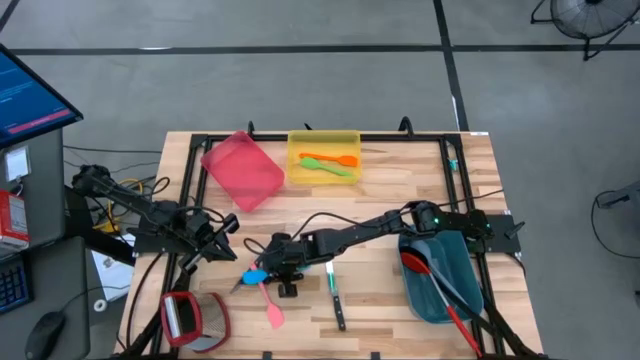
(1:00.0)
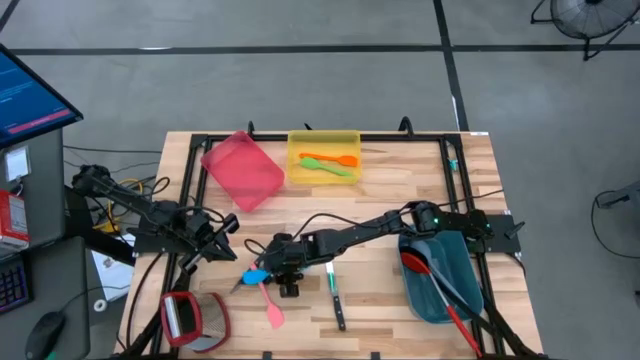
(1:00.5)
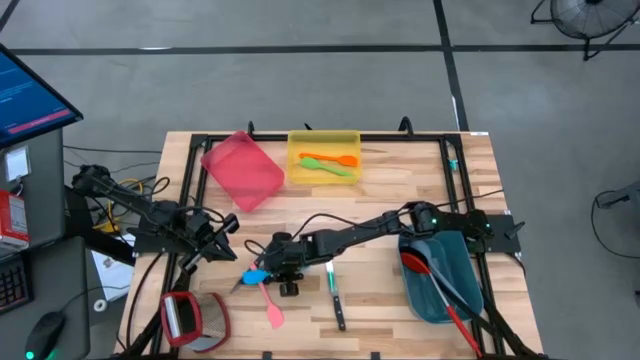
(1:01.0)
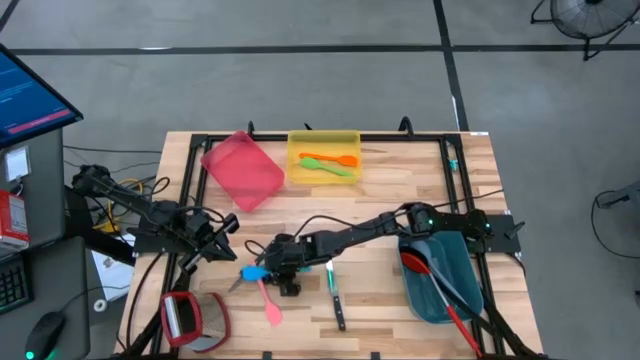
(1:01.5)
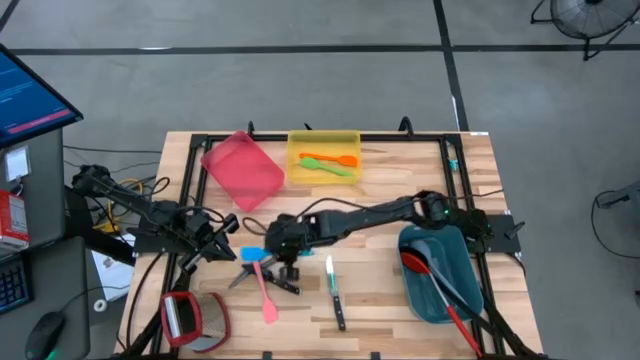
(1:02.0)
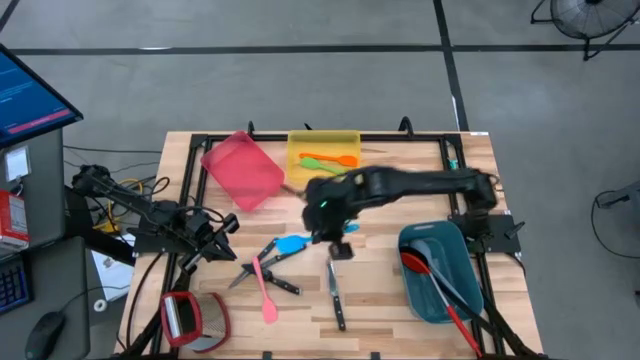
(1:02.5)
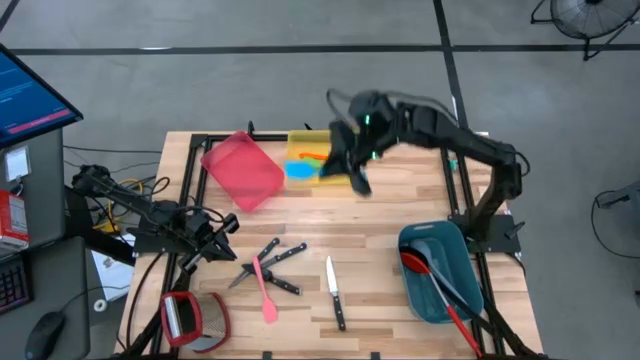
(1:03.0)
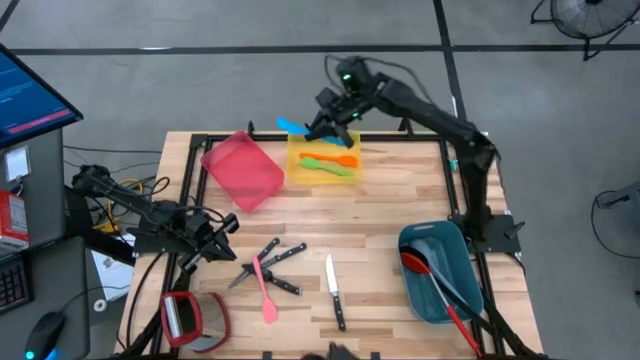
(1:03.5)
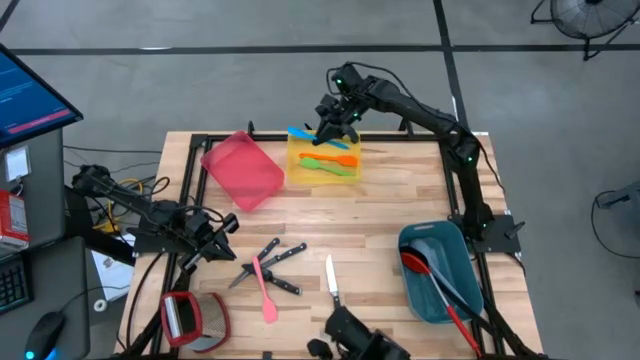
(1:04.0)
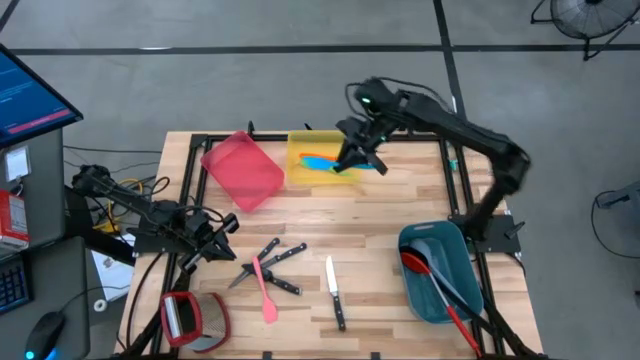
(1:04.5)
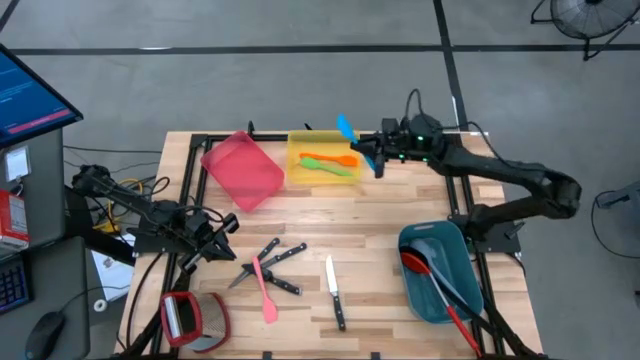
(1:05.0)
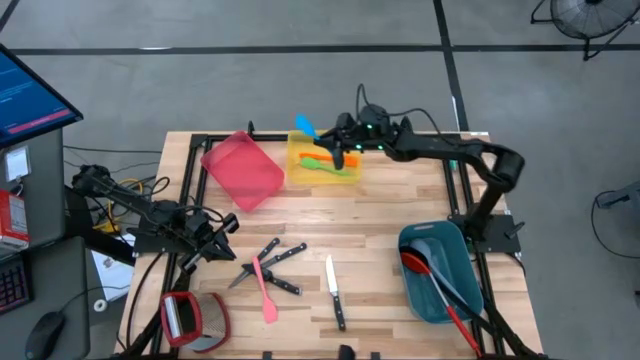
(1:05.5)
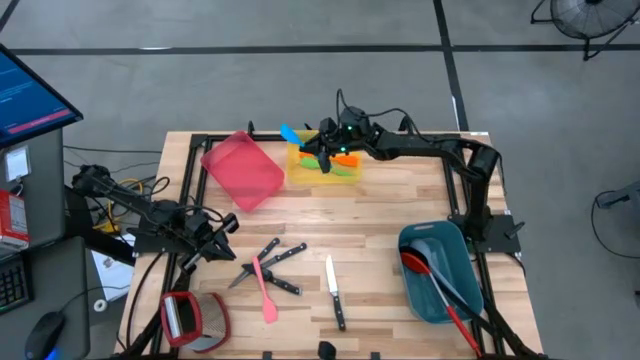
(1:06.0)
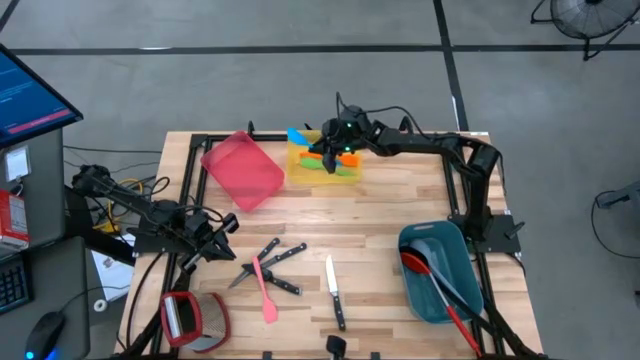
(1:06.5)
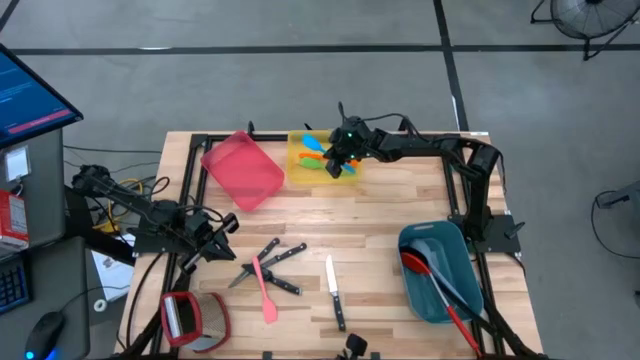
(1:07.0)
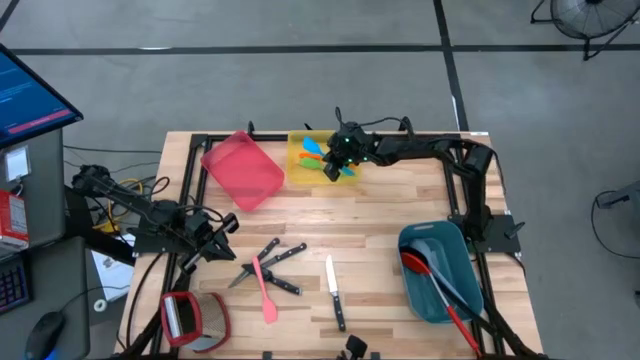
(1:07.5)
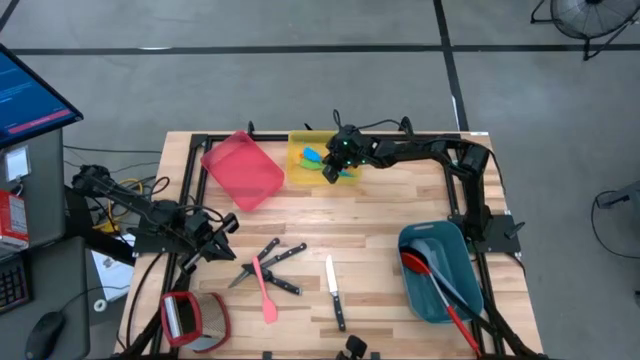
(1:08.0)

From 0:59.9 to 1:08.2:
Task: Pick & Place Kitchen Items
Put the blue spatula into the yellow bin

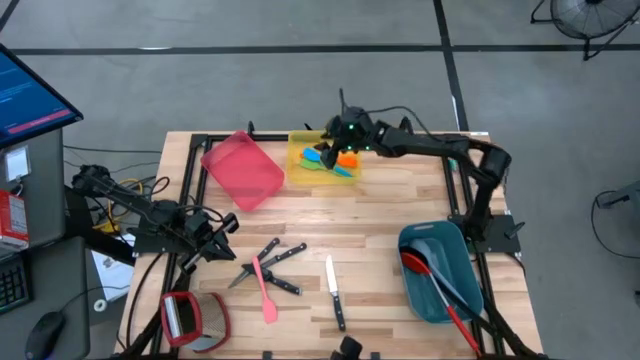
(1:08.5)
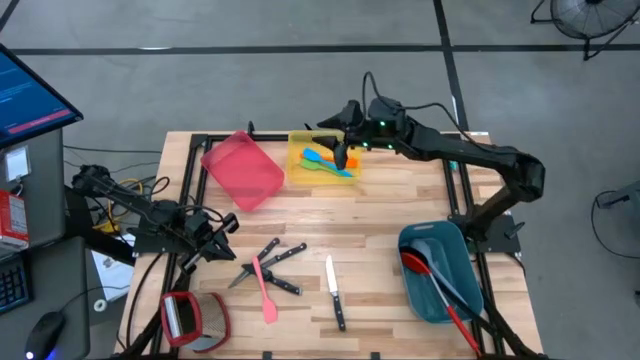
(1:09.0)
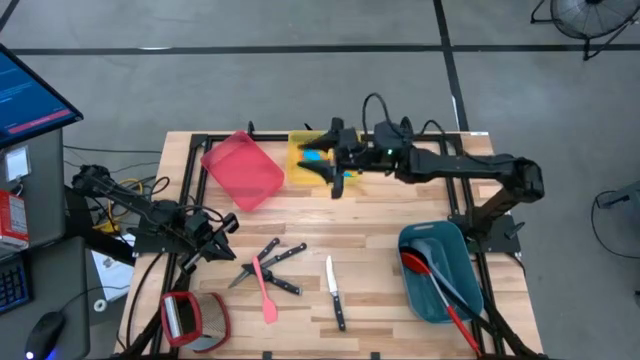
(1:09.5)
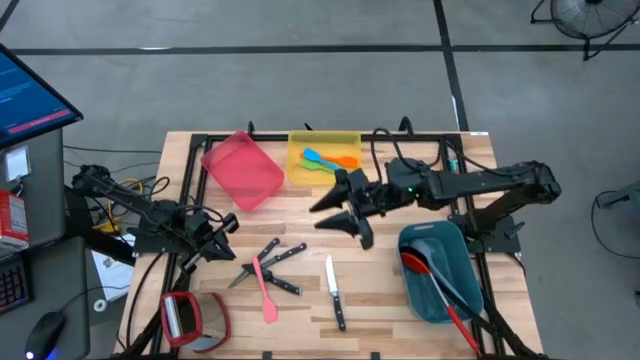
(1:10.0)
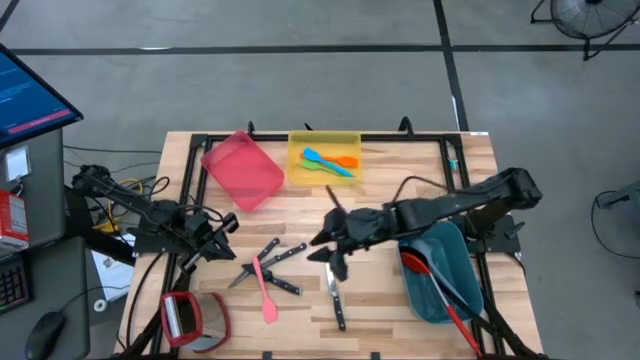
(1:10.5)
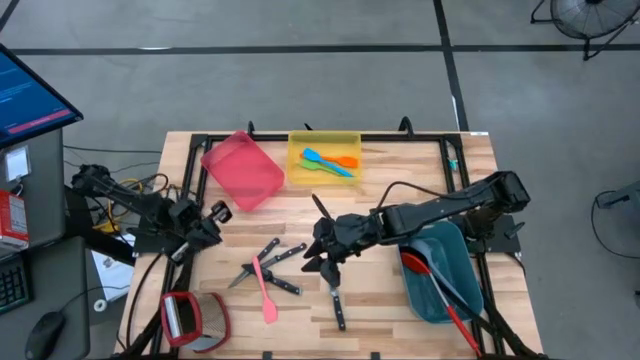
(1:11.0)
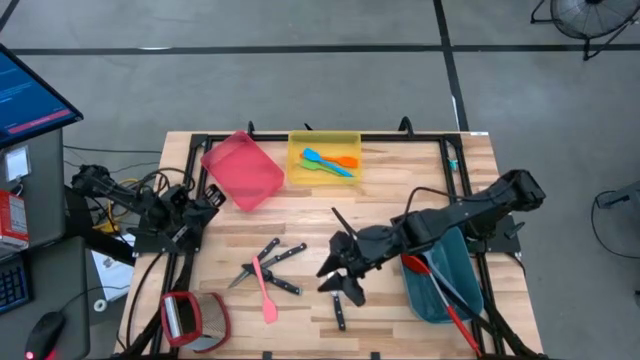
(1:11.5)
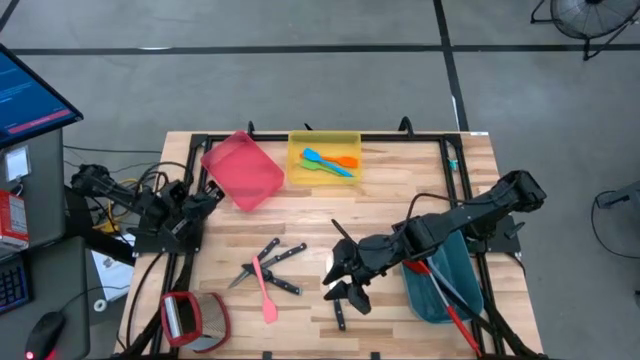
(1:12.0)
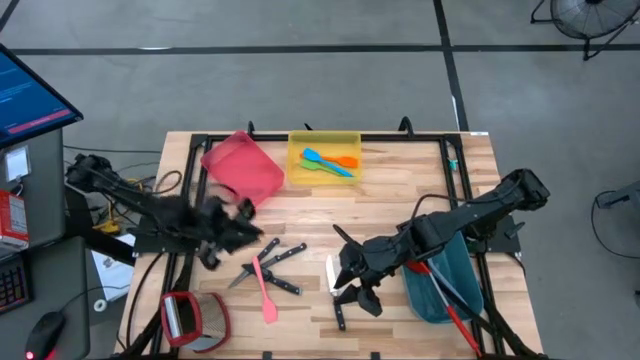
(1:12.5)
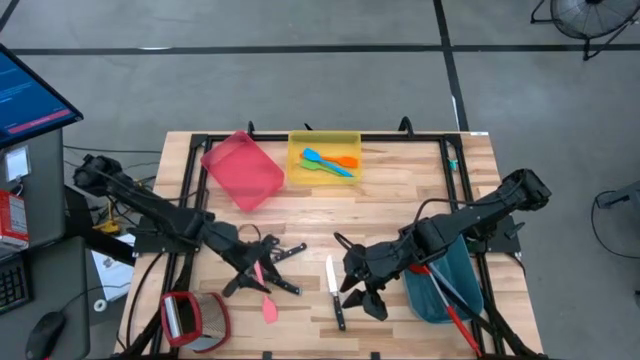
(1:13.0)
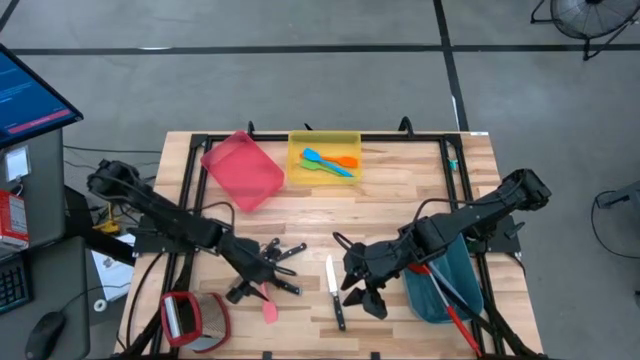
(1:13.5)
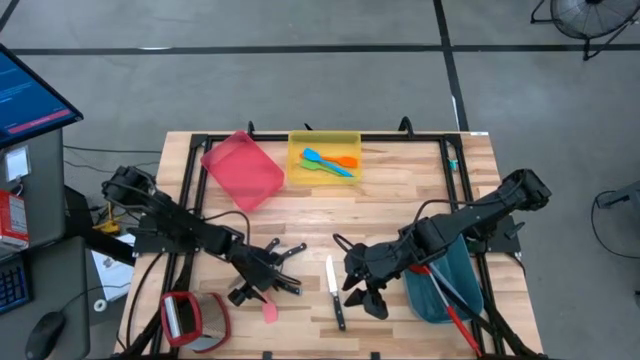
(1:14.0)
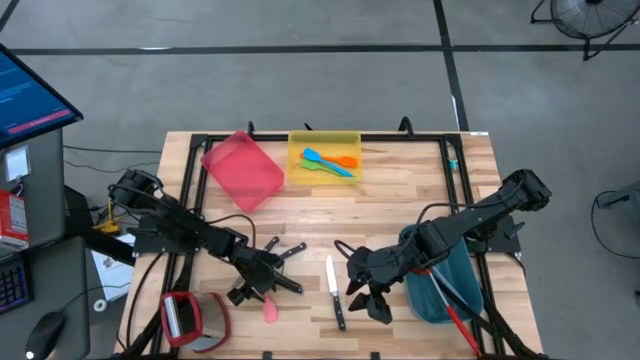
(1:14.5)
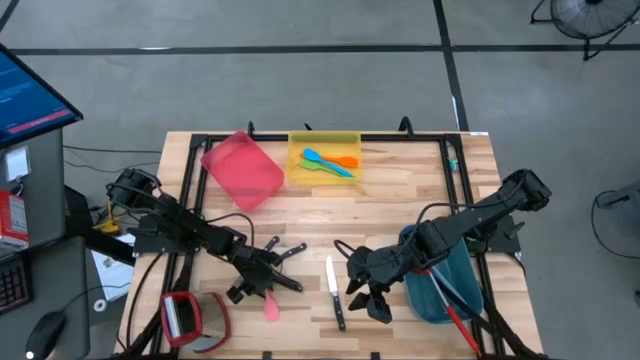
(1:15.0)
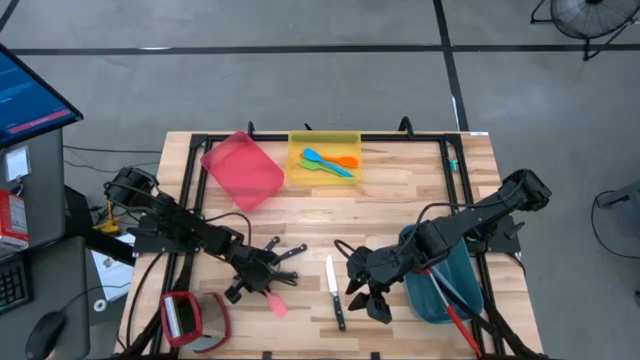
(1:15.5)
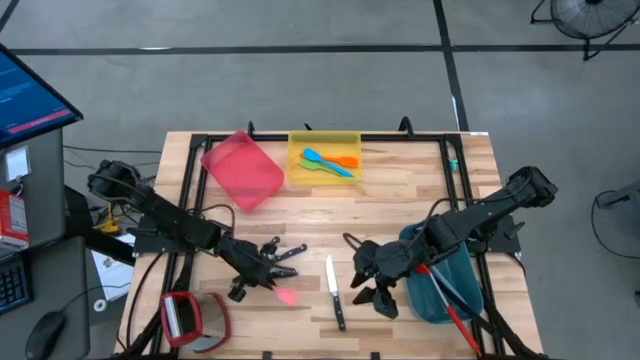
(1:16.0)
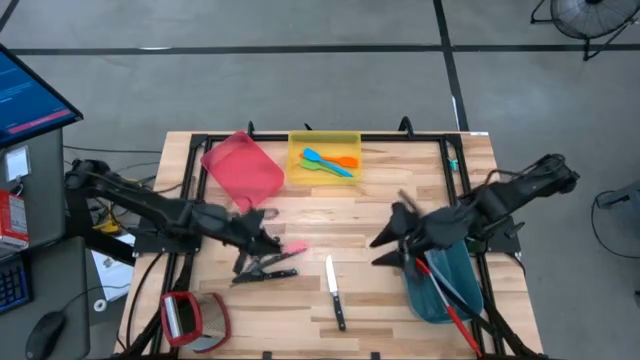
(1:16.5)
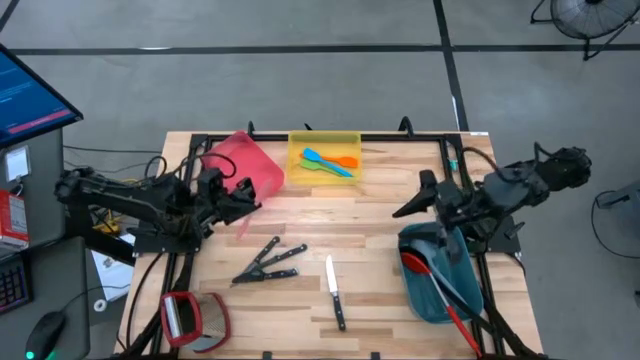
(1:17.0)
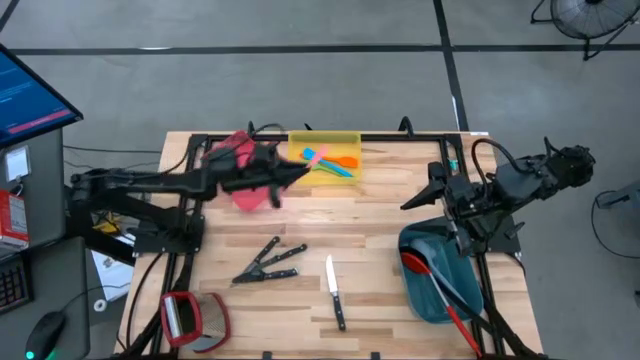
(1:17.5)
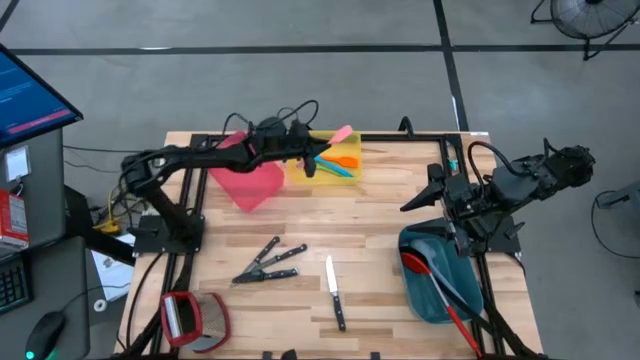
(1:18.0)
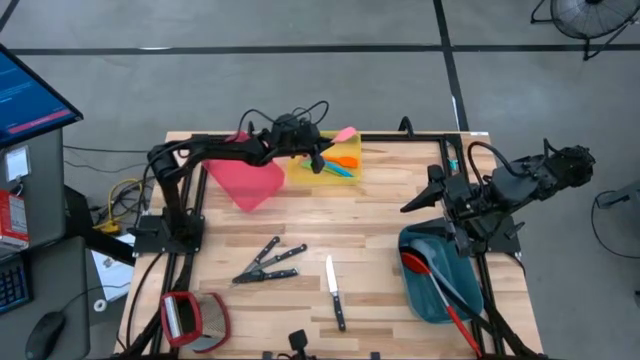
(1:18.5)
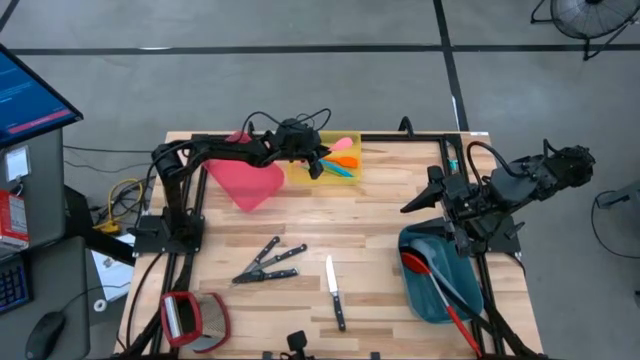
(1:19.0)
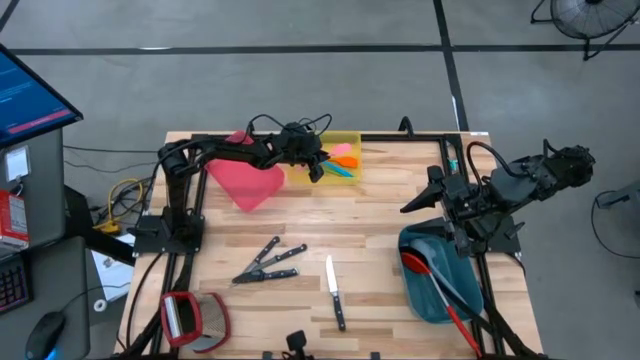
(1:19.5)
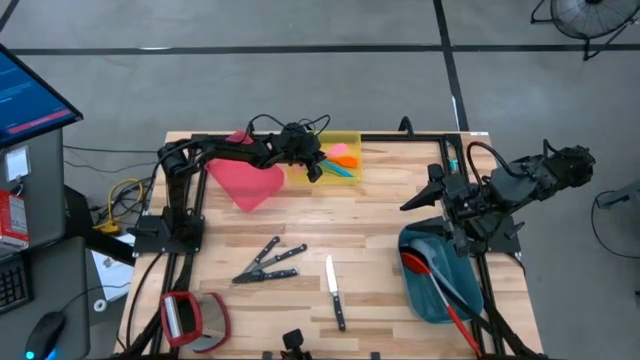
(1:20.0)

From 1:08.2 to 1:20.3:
Put the pink spatula into the yellow bin
